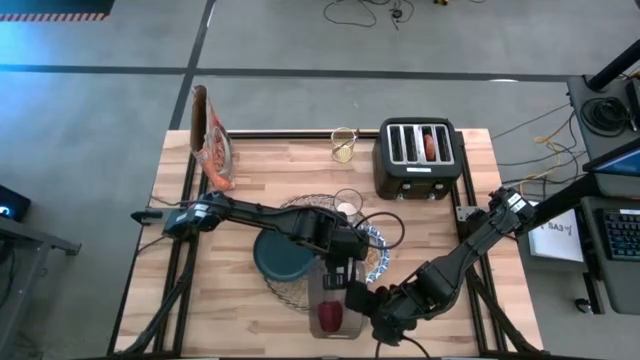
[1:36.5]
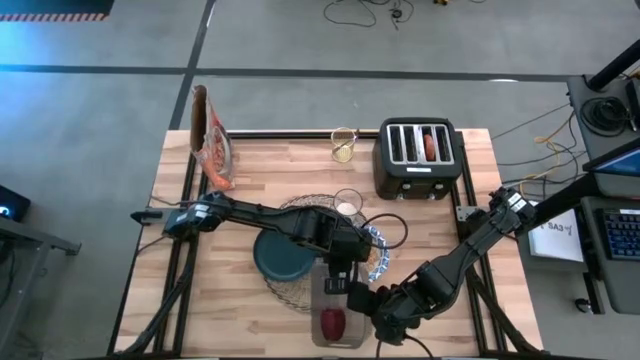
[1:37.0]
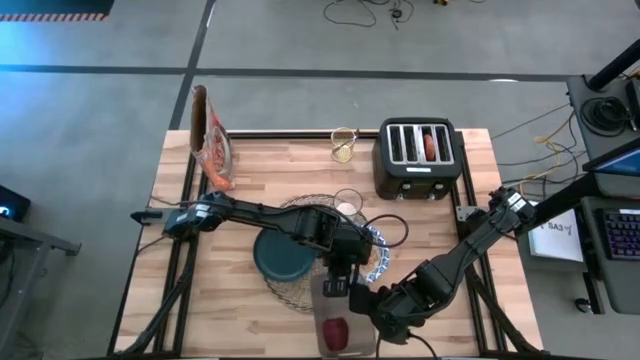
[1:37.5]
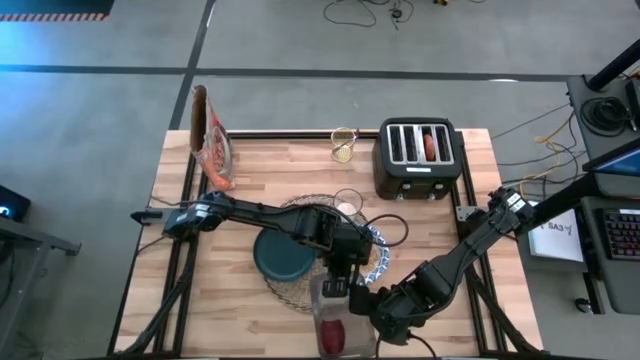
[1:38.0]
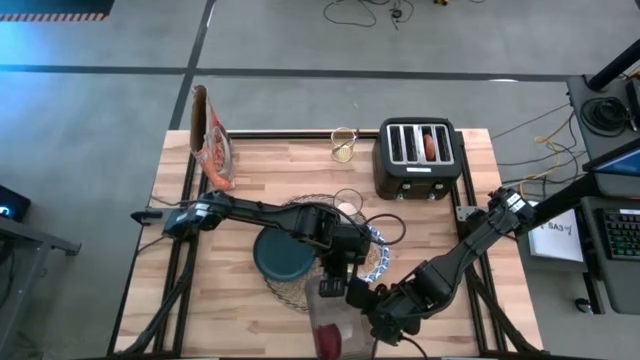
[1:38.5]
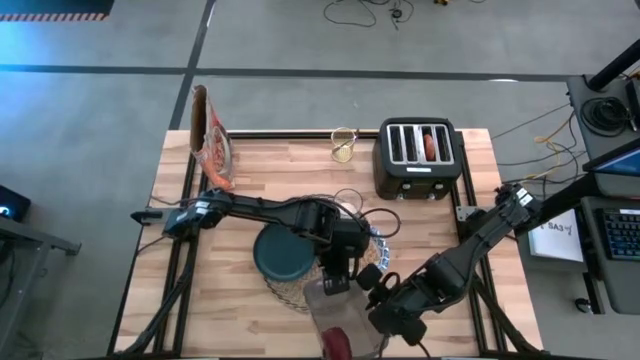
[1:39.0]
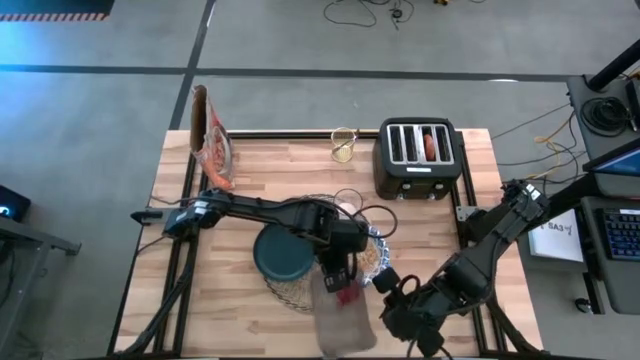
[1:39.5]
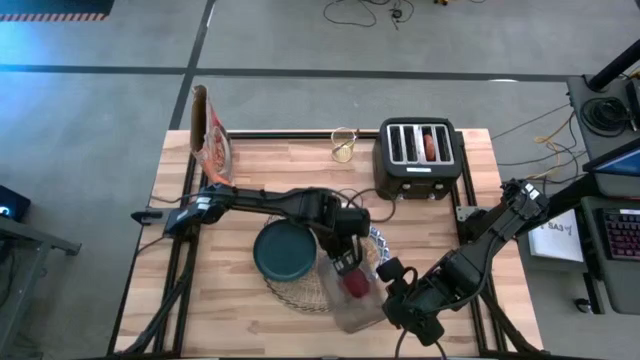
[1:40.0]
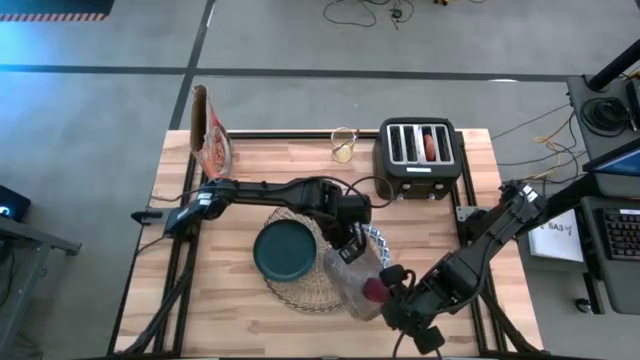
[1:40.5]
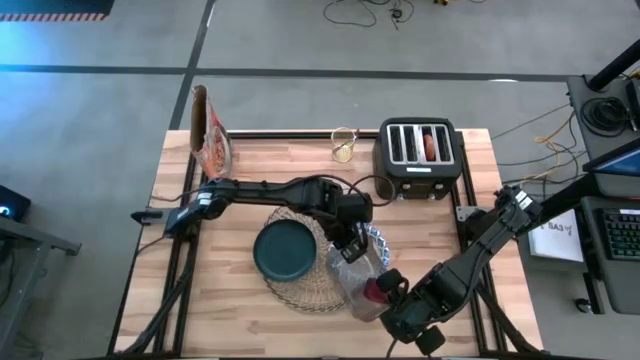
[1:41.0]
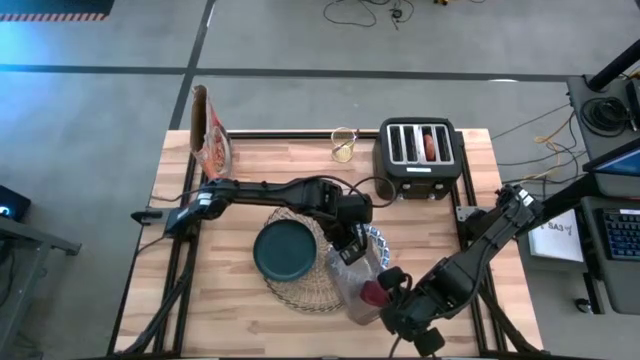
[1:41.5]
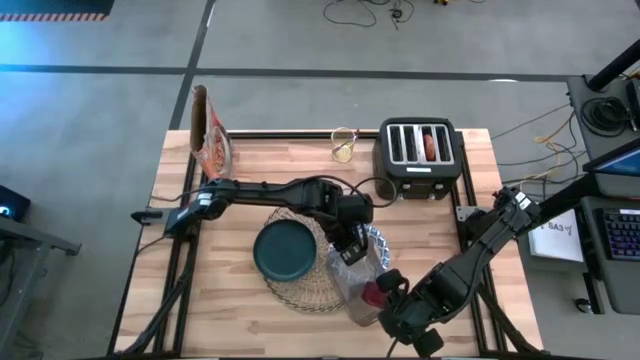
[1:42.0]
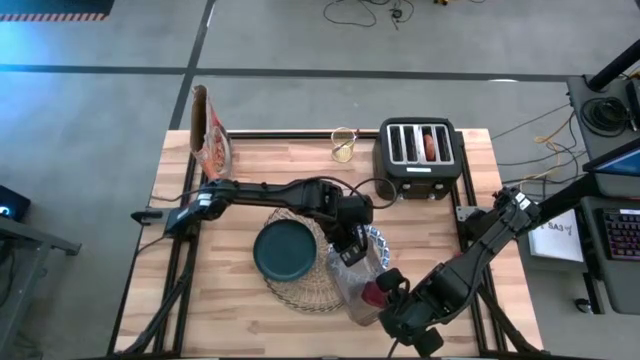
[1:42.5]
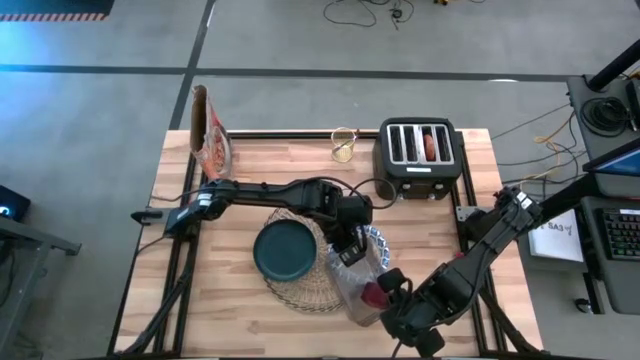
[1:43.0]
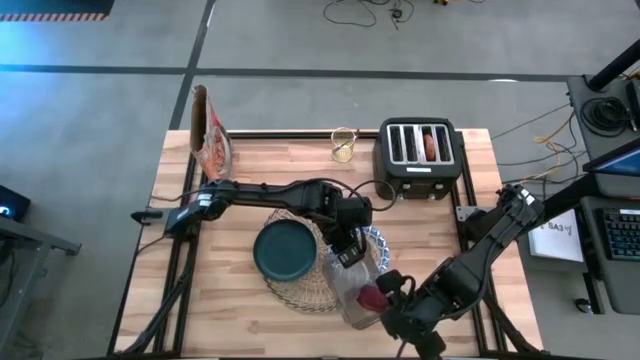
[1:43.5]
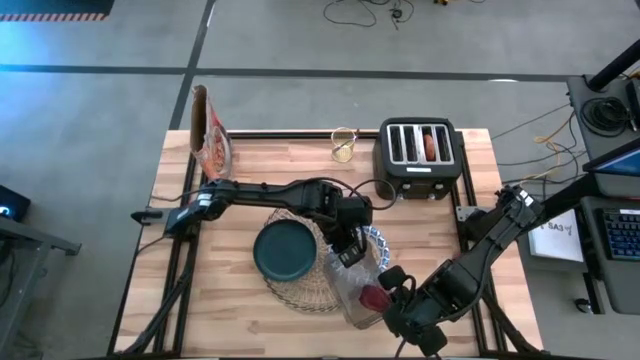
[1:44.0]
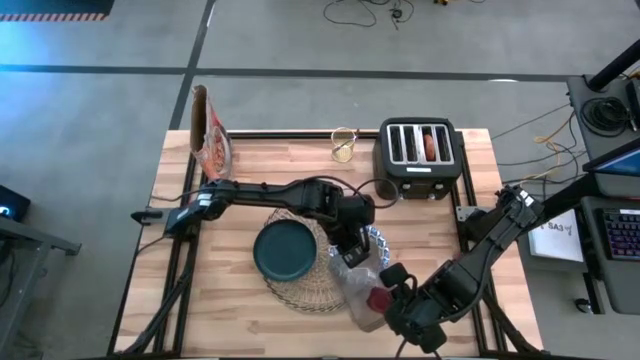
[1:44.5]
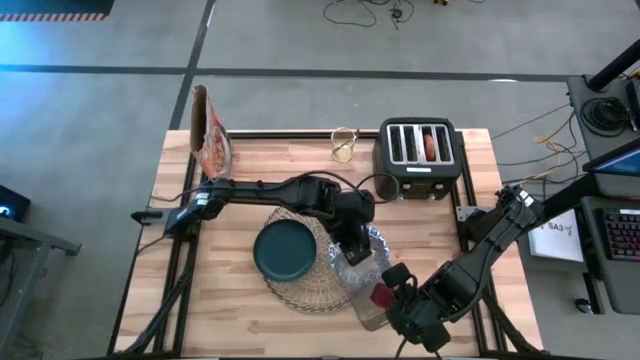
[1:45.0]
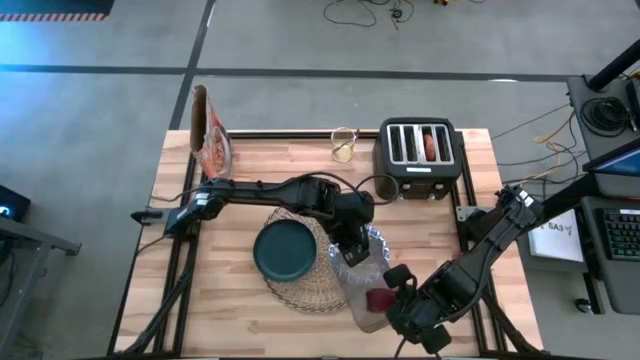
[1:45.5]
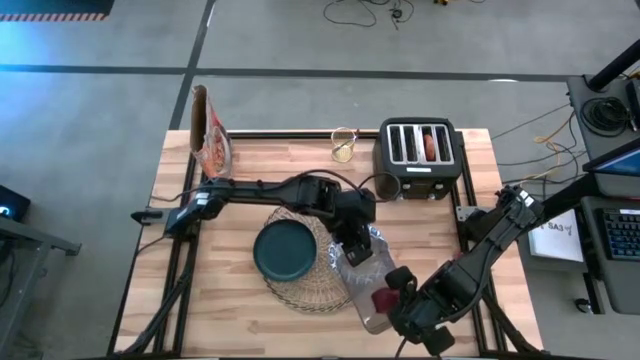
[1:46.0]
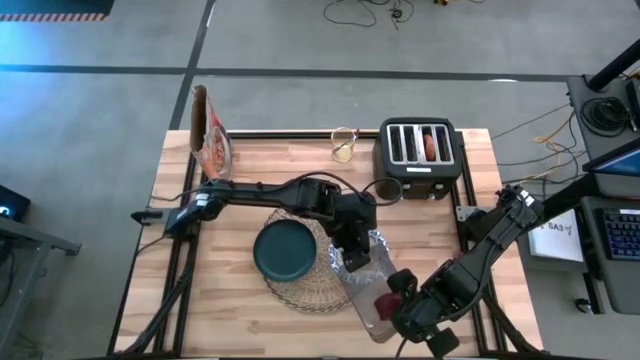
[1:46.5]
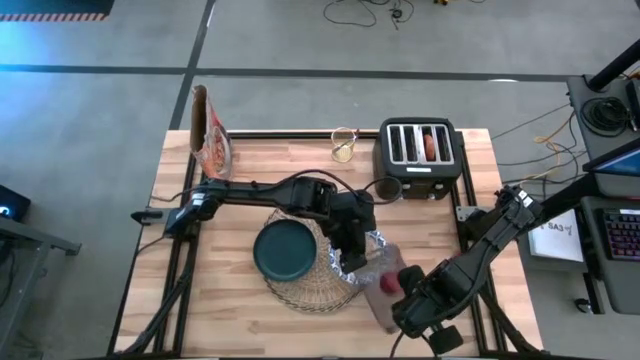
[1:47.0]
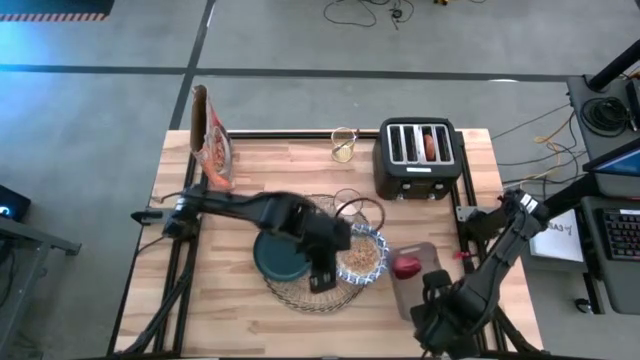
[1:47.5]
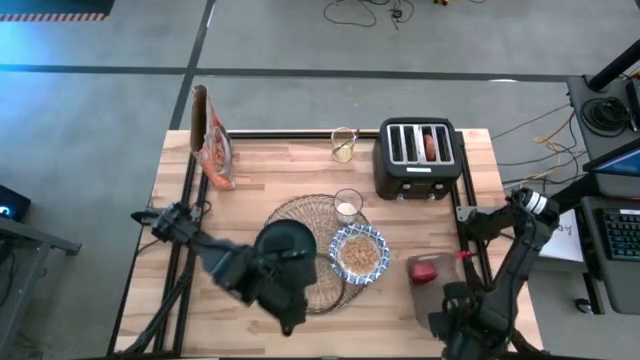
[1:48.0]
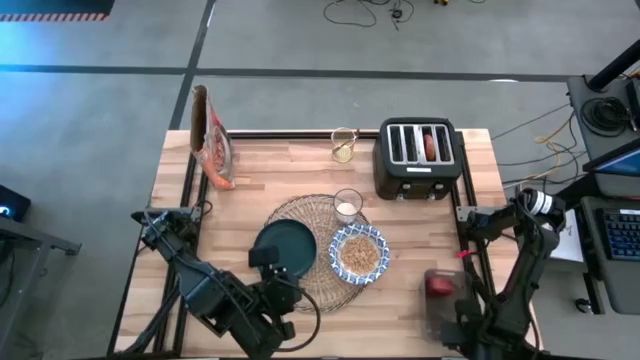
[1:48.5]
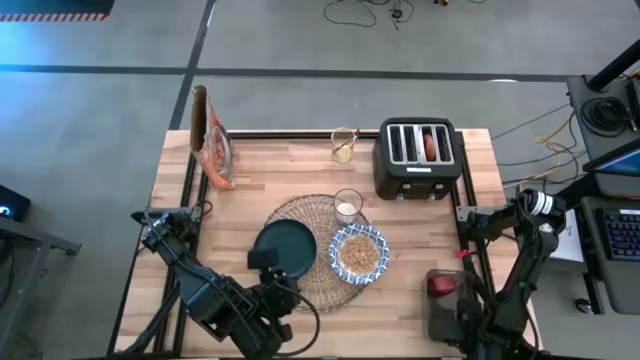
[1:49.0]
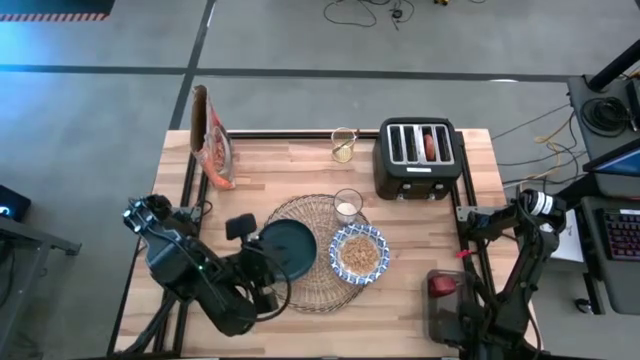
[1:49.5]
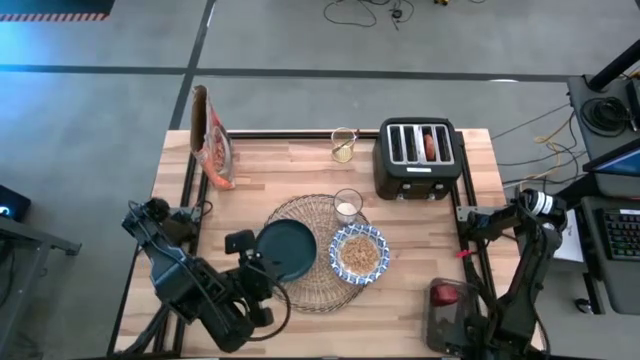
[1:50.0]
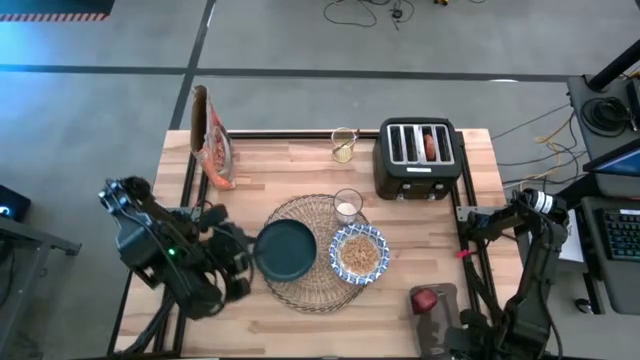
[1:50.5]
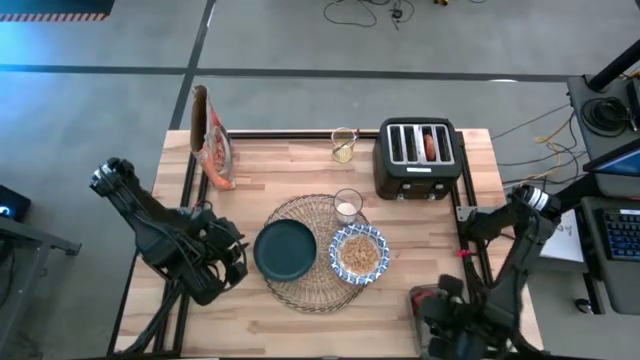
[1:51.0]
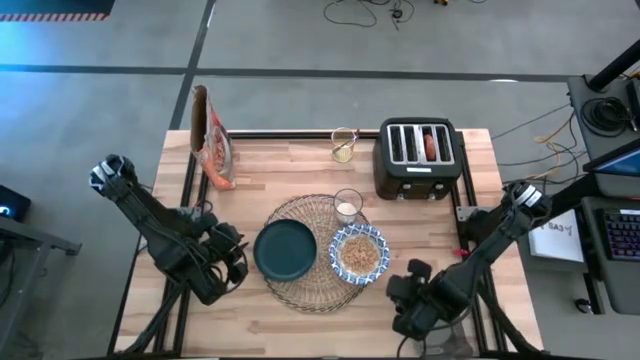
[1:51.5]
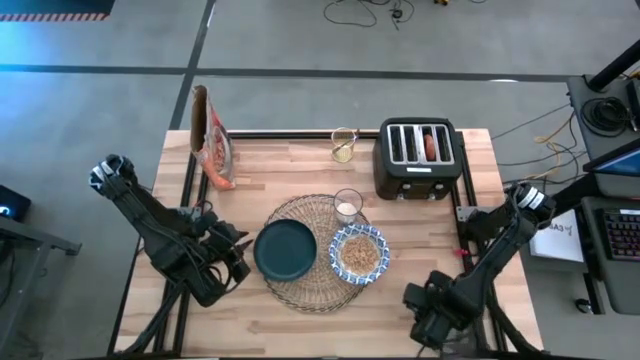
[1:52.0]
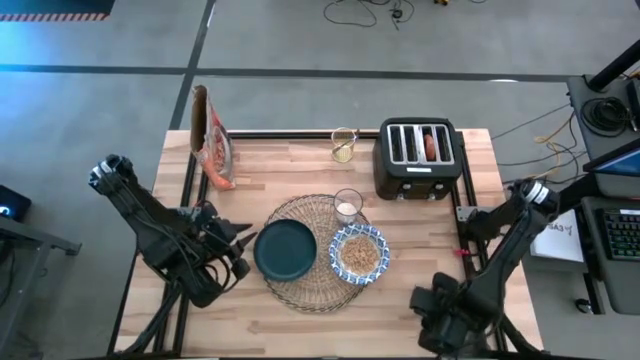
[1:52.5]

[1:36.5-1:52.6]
Task: Arrange a breakfast setting
Move the black bin to the bottom right of the table

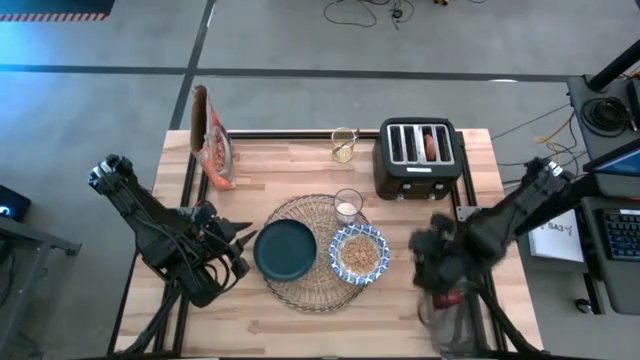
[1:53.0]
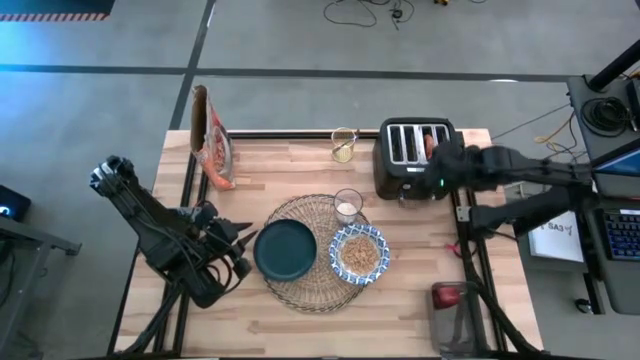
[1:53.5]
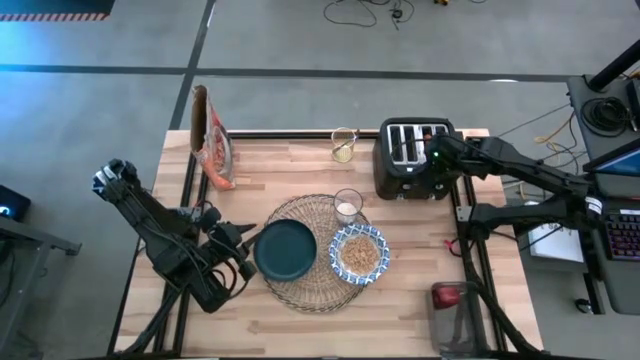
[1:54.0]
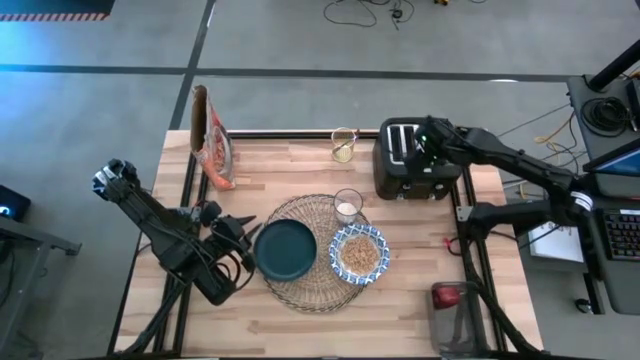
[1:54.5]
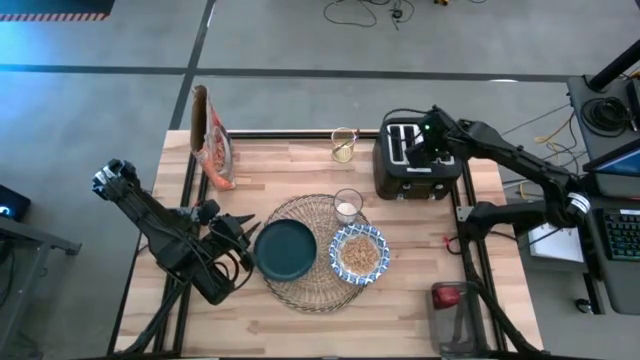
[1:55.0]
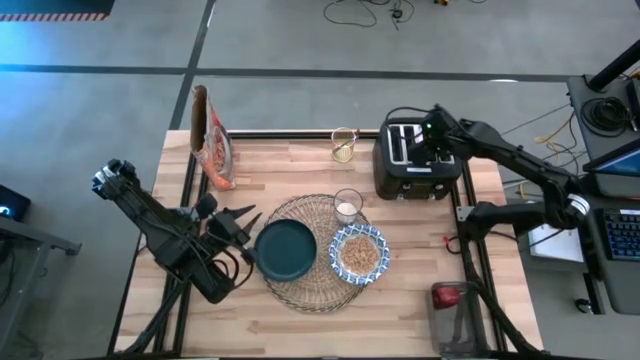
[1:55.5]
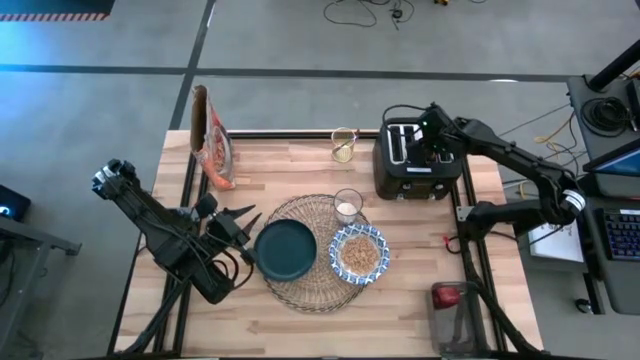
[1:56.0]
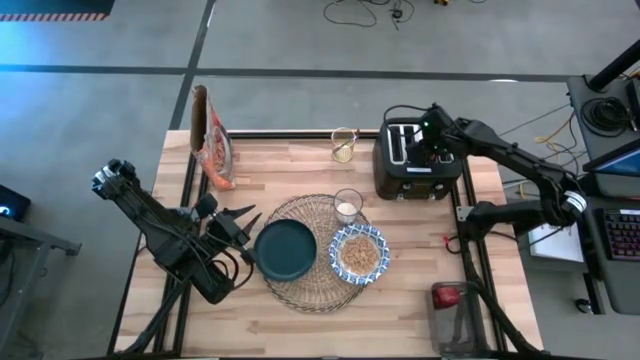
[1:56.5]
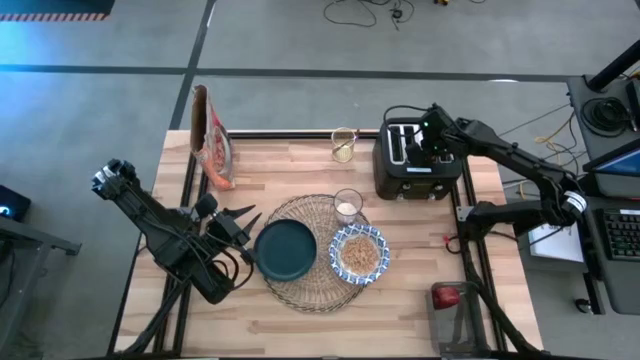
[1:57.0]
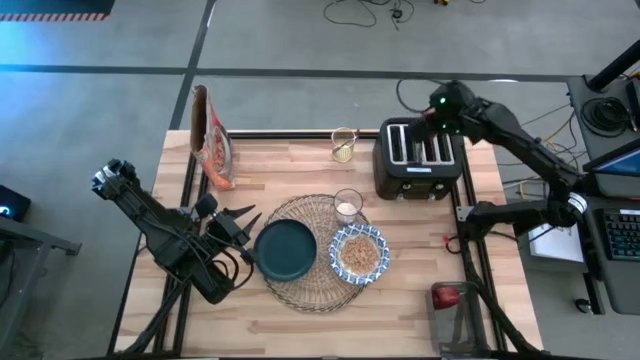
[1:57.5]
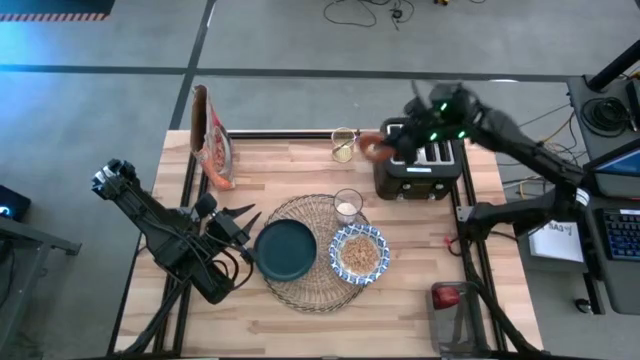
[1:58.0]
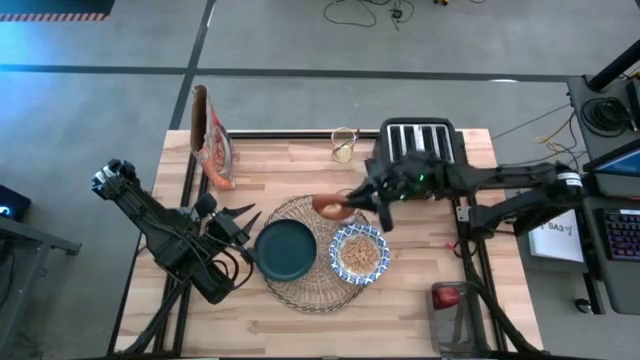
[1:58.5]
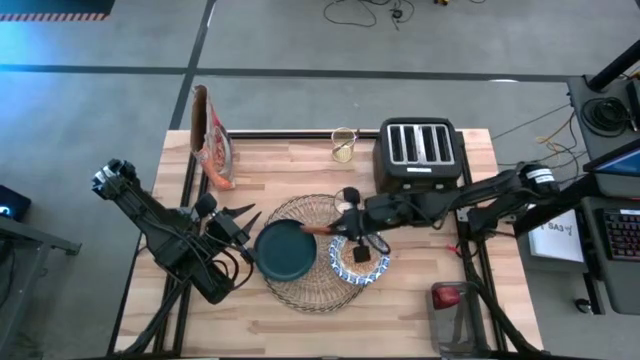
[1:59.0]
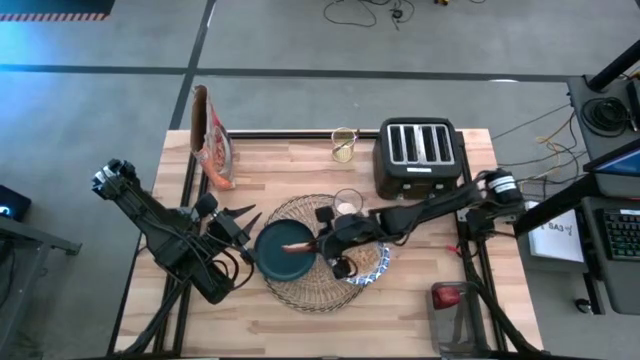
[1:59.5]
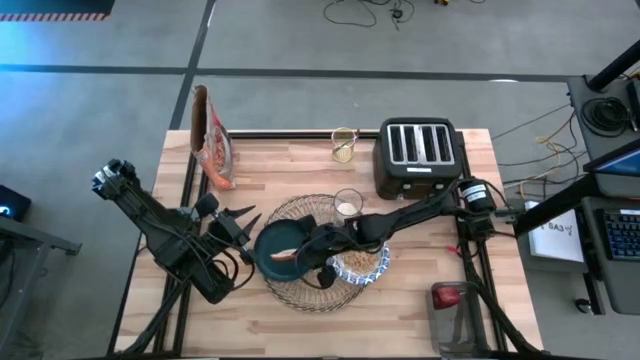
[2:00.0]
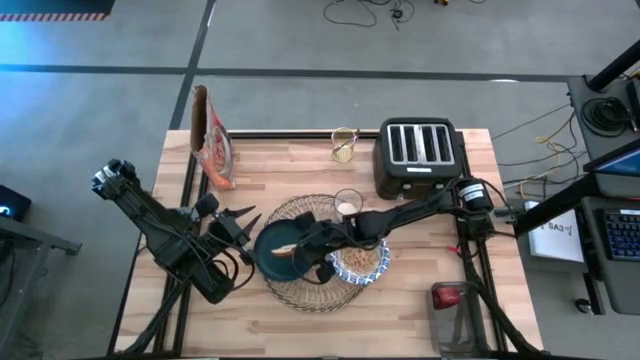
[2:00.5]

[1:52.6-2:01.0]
Put the toasted bagel on the green plate
